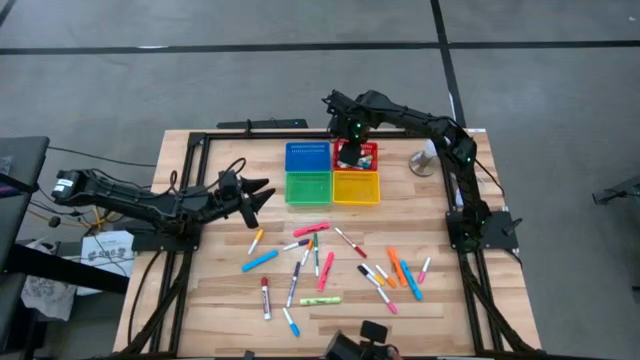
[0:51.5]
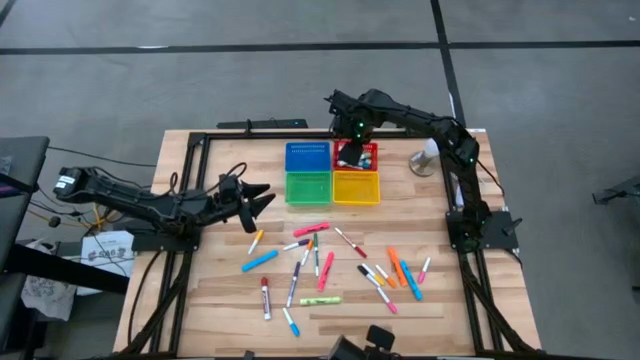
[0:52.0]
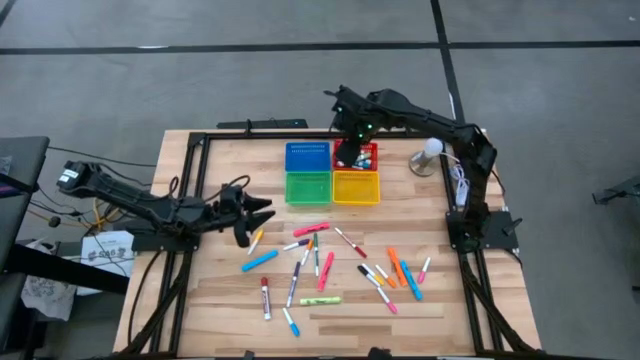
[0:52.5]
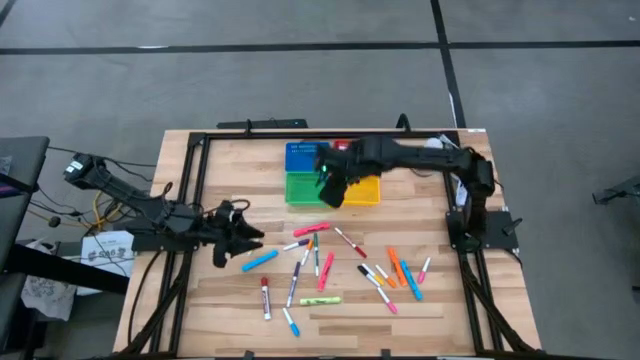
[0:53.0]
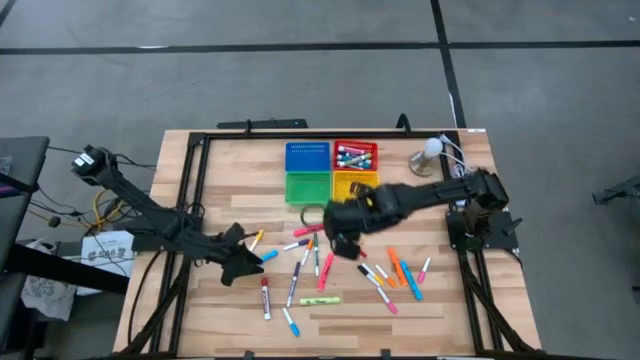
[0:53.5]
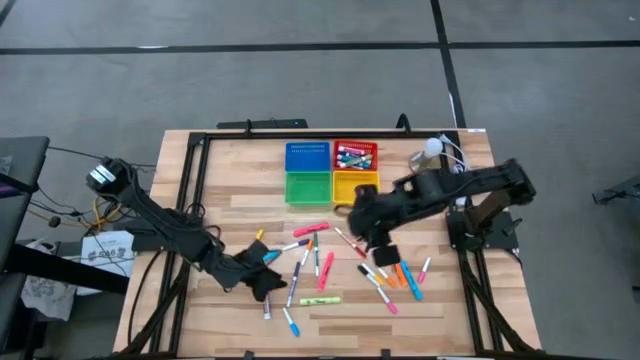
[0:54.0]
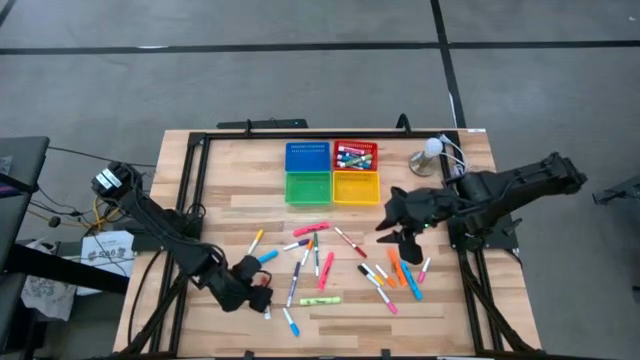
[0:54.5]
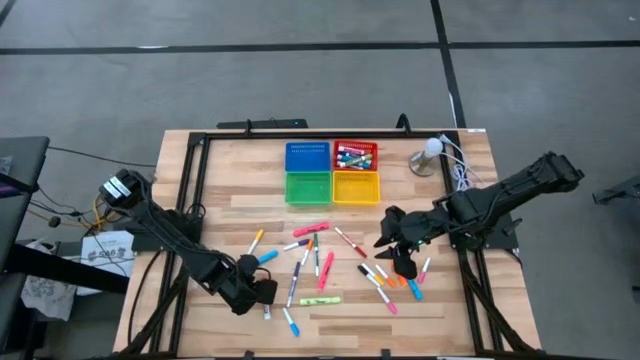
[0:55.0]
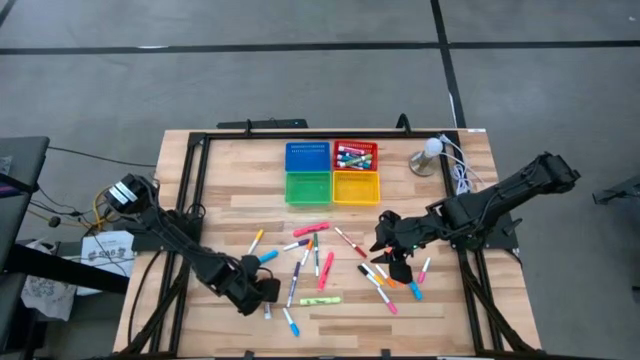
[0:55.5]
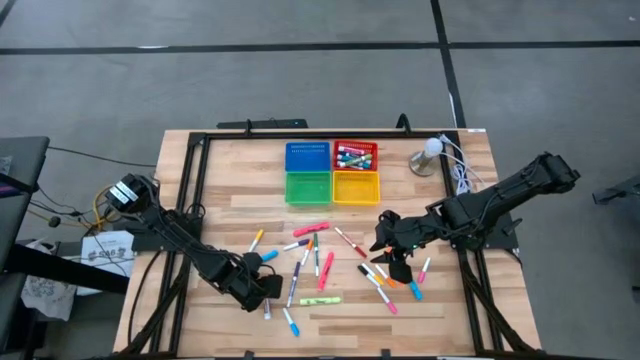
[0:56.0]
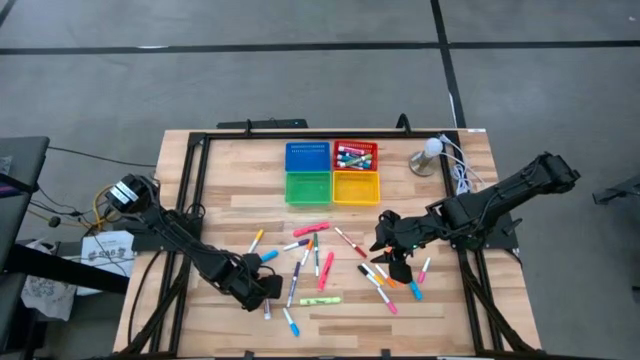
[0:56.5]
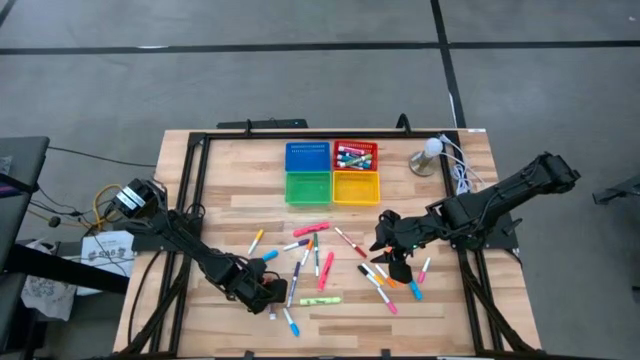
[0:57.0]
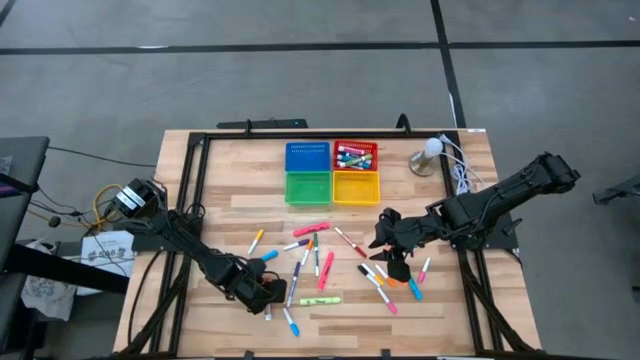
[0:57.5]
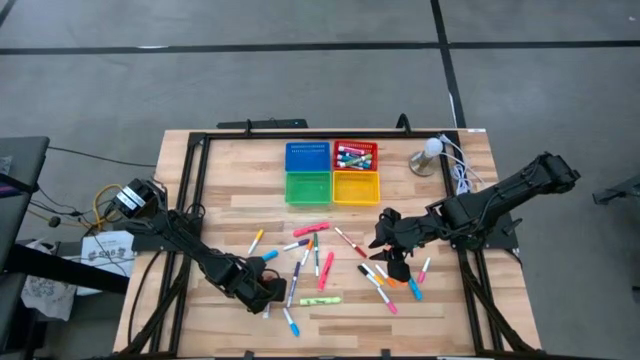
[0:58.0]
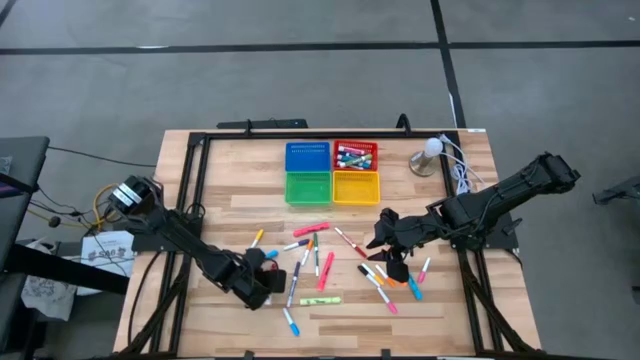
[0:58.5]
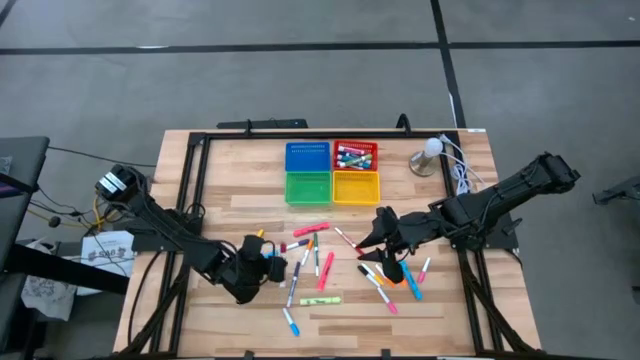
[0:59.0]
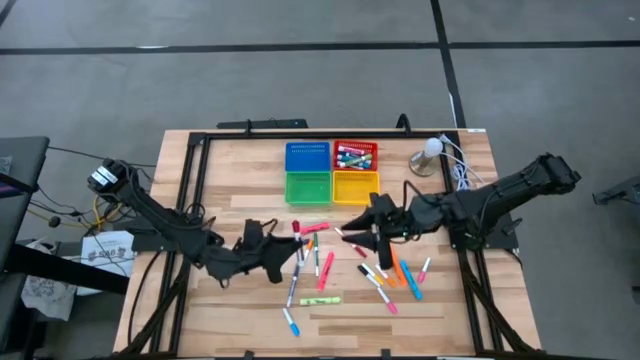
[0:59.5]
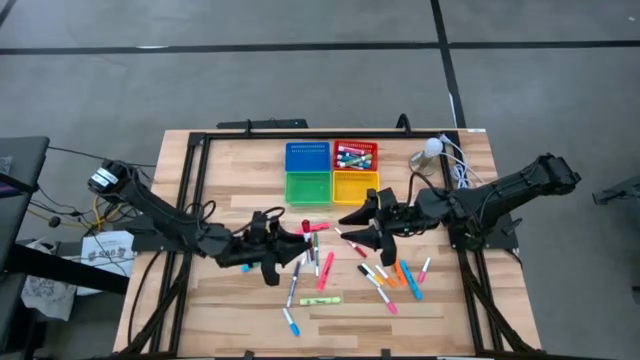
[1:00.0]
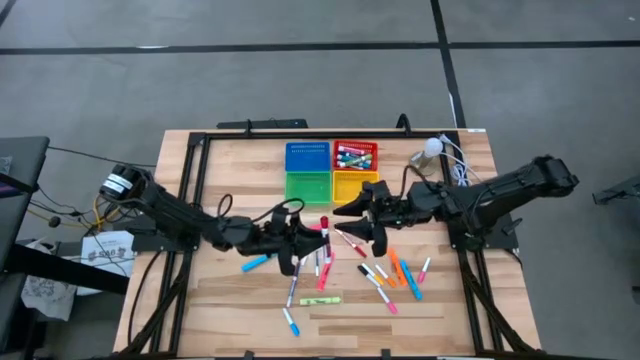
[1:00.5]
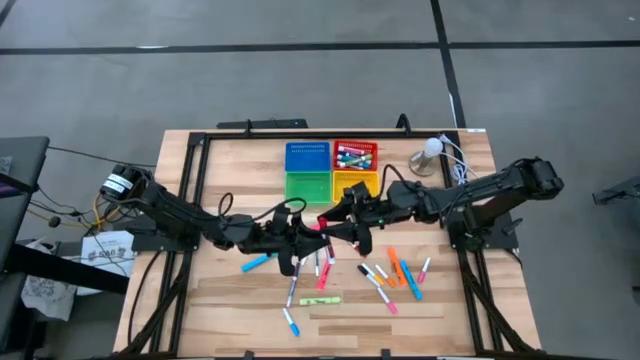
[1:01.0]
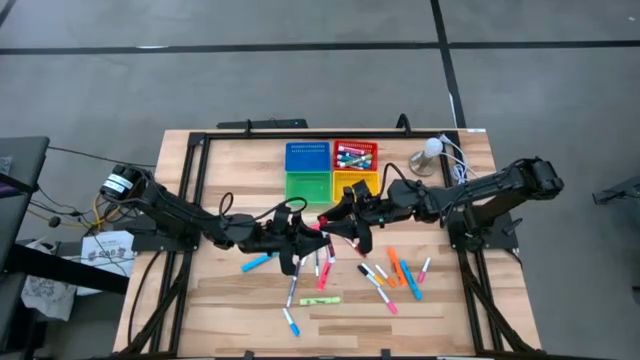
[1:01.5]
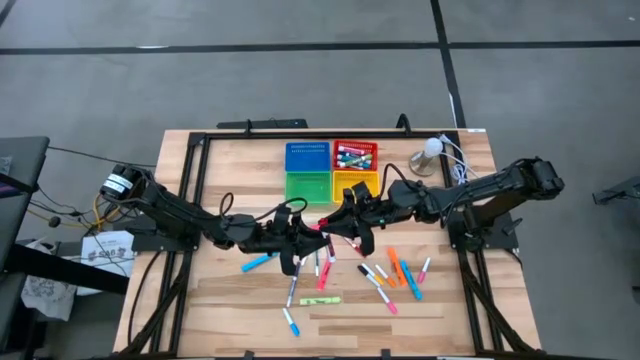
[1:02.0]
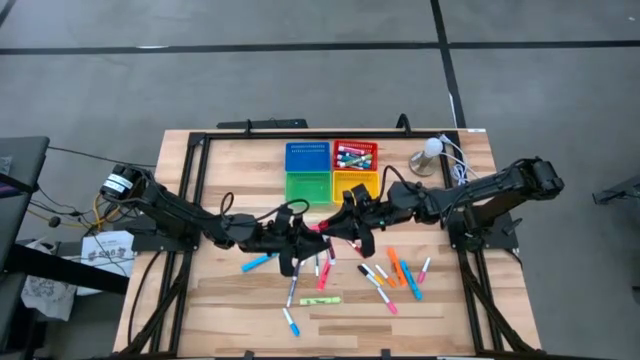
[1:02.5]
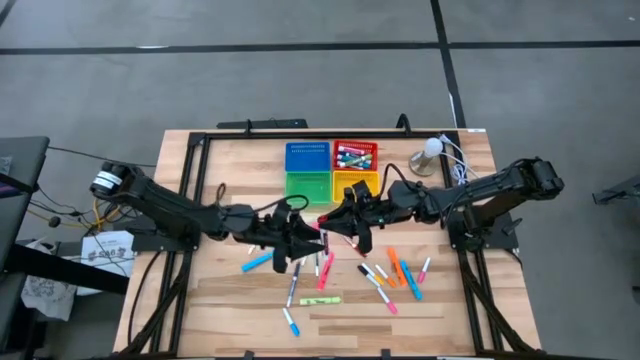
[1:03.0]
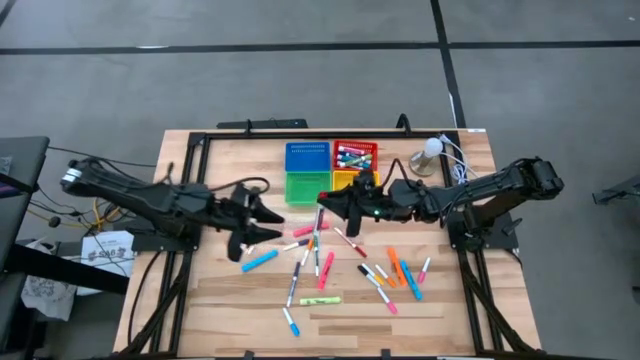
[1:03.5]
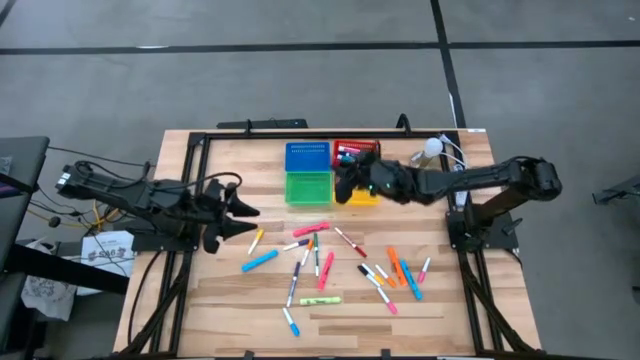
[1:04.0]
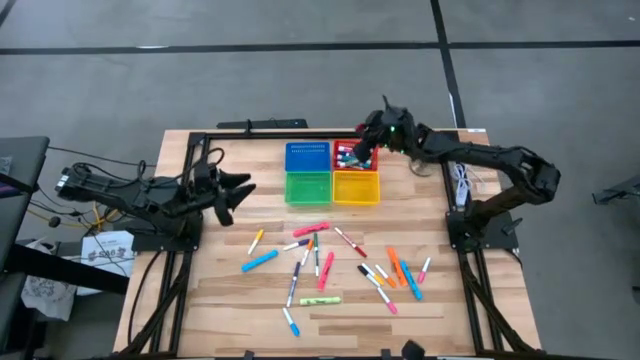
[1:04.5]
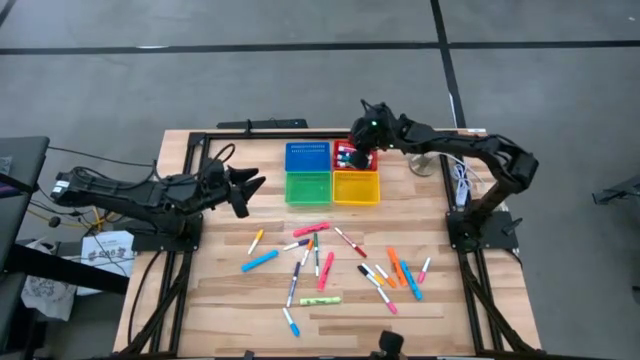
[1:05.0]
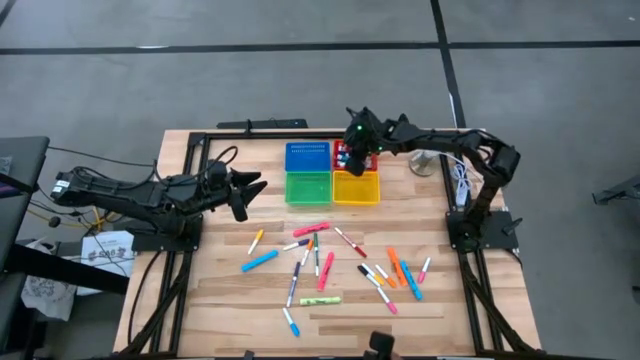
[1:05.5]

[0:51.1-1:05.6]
Task: Pick & Place Markers
Put the red thick dry erase marker into the red bin

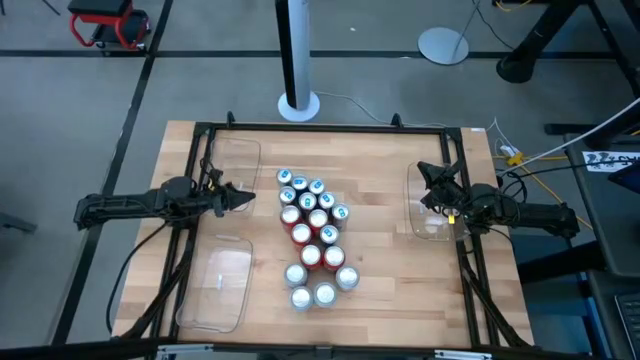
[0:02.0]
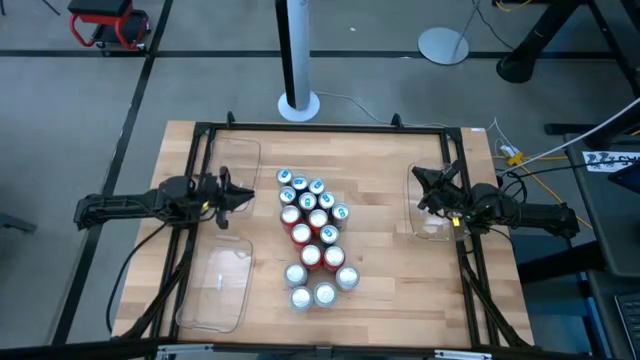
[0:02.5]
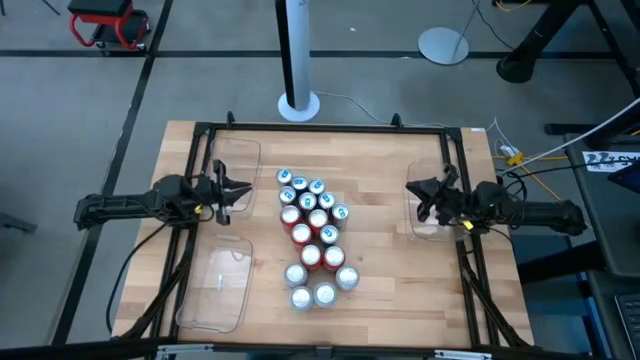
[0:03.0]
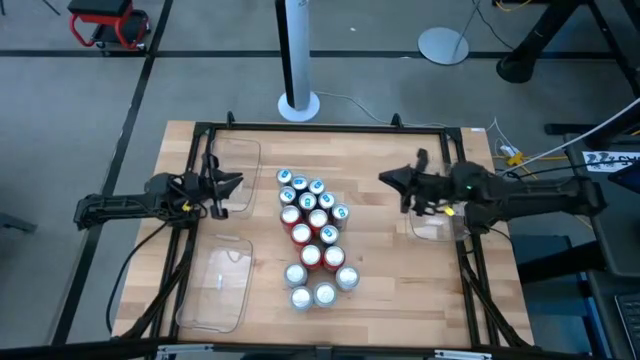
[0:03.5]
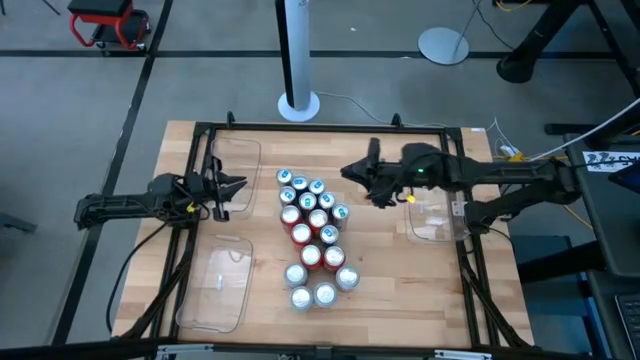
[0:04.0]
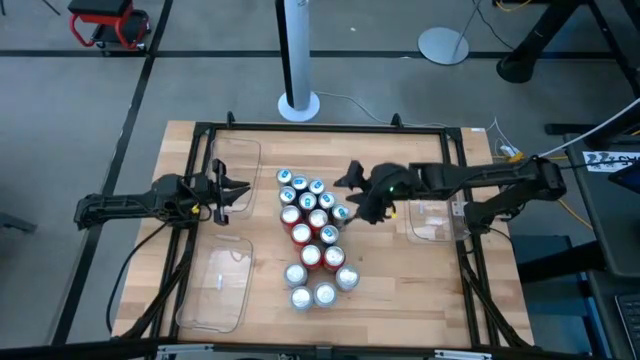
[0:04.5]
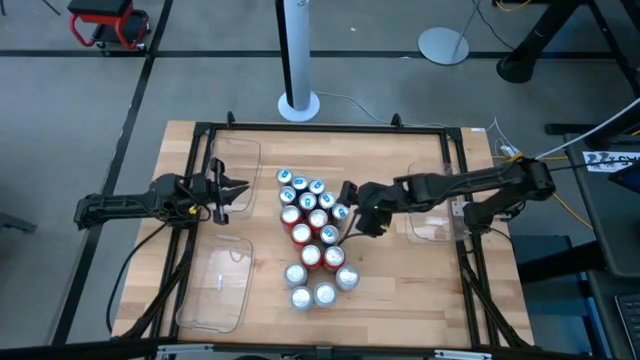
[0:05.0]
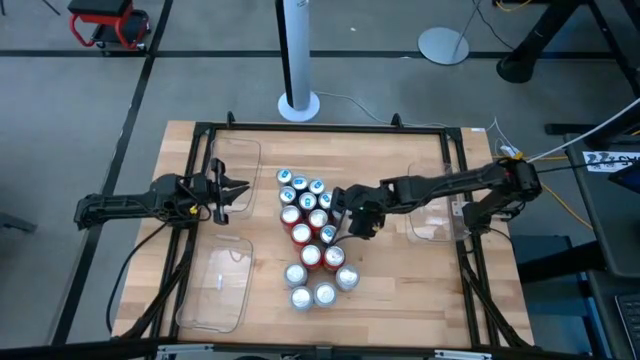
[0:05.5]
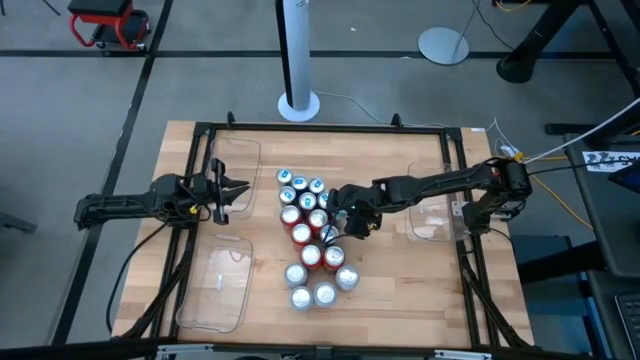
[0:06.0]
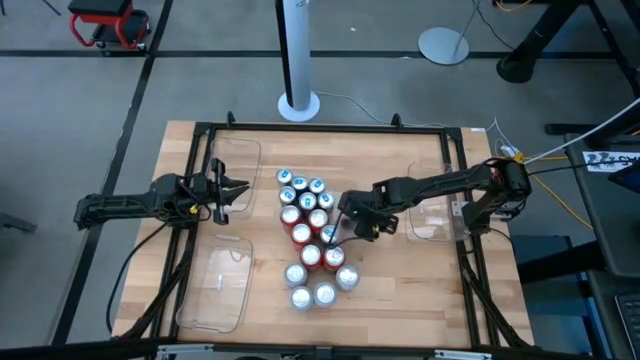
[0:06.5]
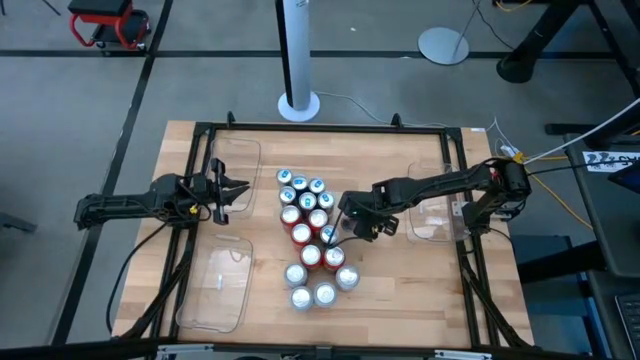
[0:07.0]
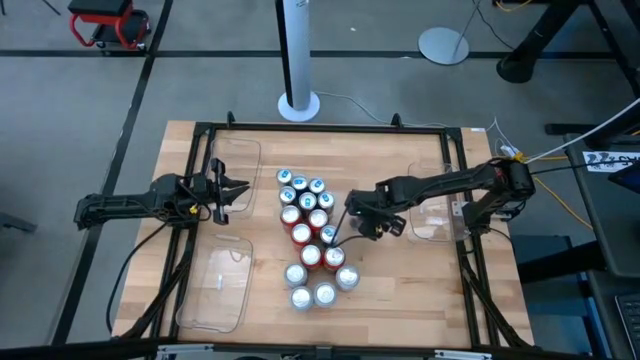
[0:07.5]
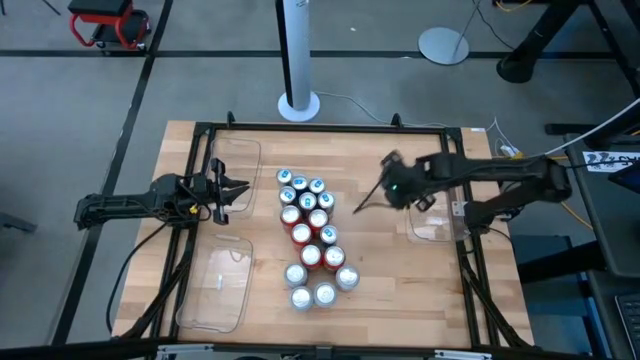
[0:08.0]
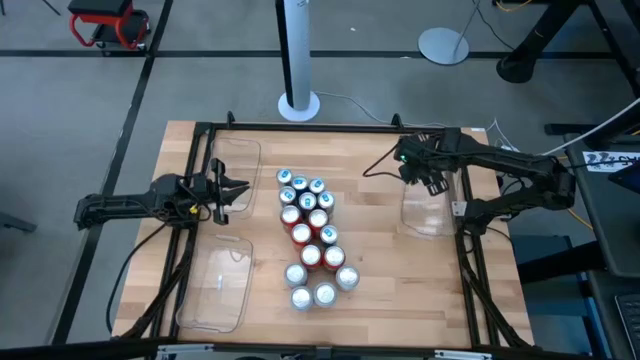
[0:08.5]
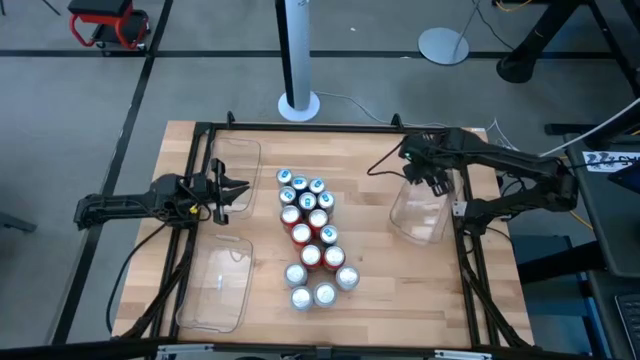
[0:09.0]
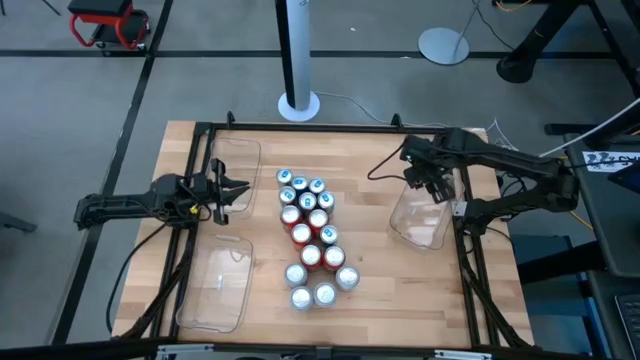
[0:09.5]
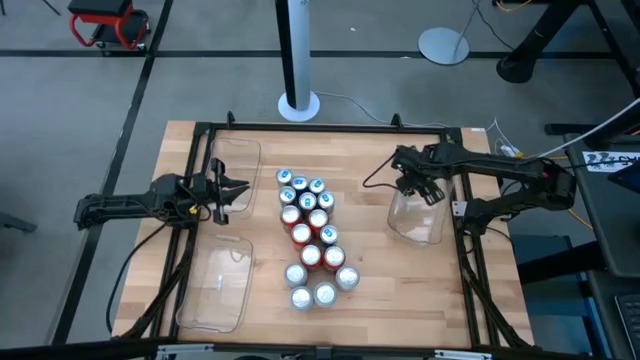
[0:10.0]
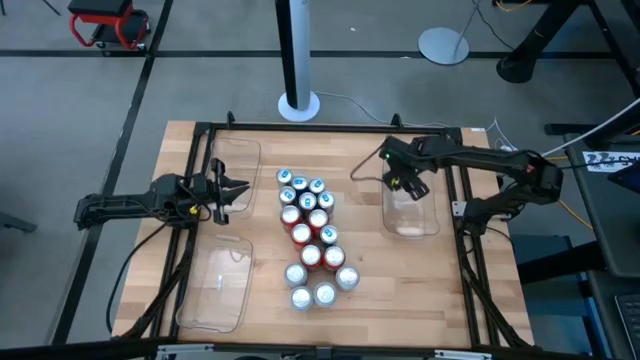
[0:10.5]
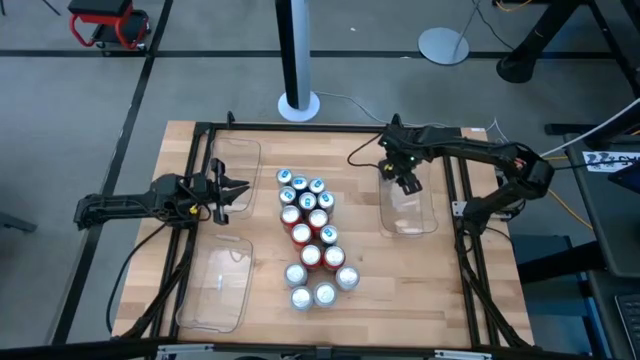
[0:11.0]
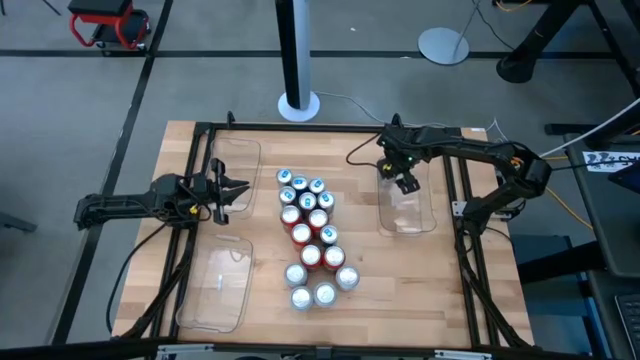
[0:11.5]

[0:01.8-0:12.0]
Task: Sort soda cans
Put the blue soda can into the middle right transparent bin
